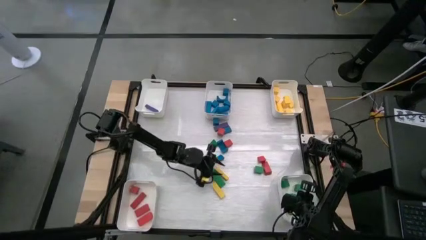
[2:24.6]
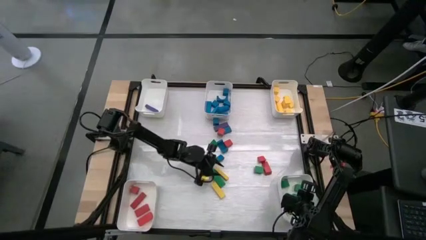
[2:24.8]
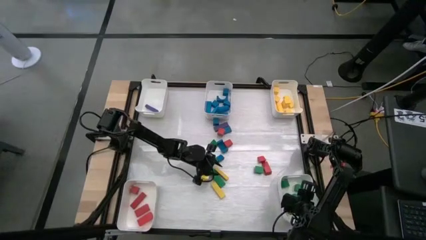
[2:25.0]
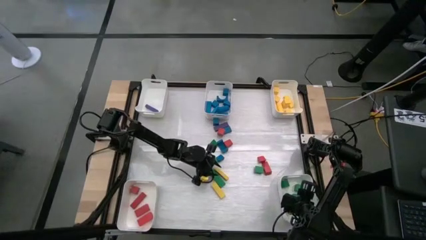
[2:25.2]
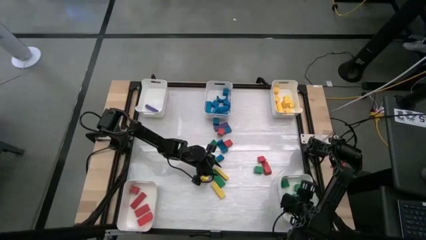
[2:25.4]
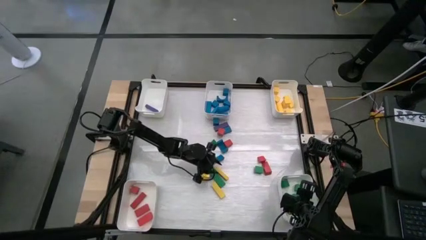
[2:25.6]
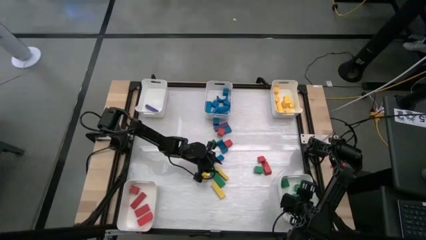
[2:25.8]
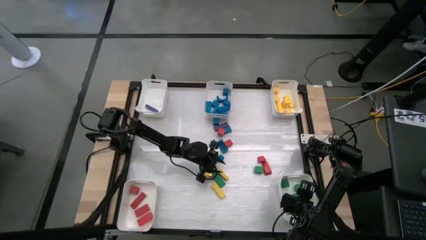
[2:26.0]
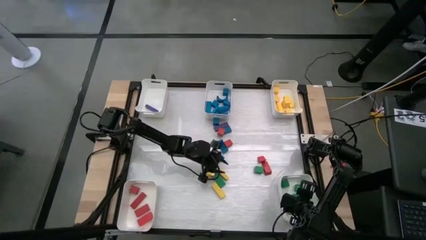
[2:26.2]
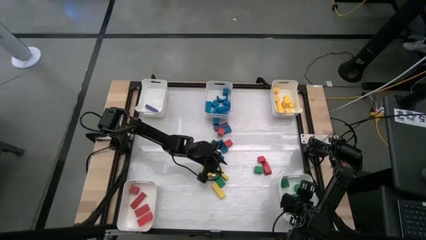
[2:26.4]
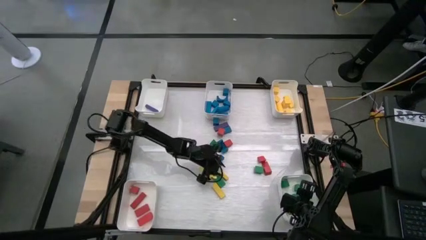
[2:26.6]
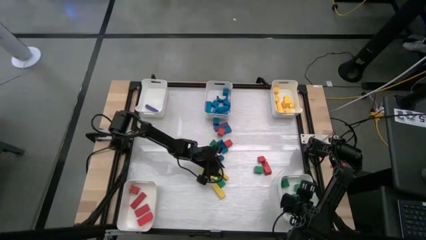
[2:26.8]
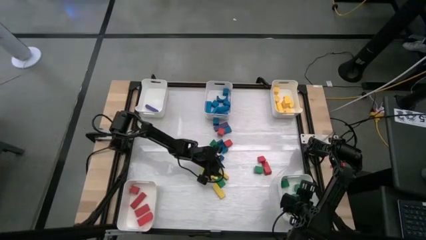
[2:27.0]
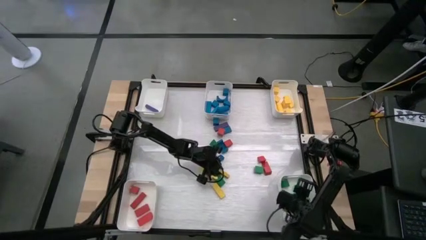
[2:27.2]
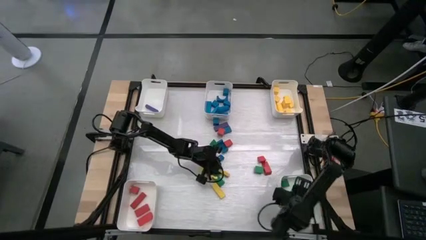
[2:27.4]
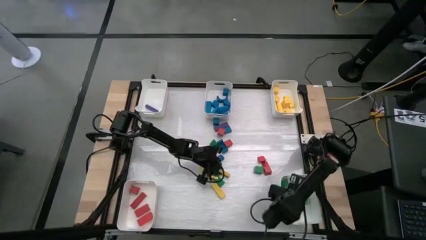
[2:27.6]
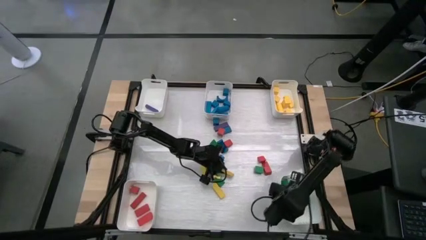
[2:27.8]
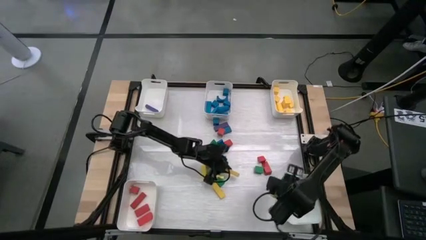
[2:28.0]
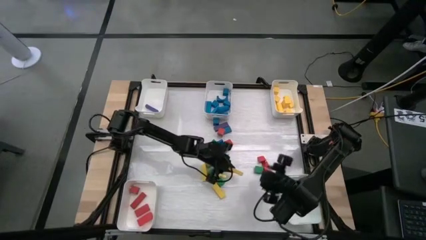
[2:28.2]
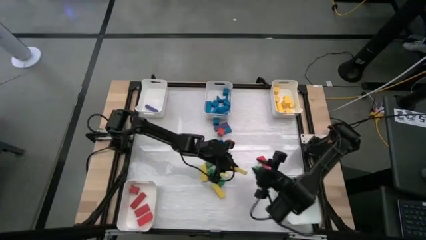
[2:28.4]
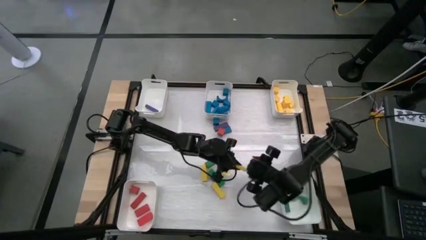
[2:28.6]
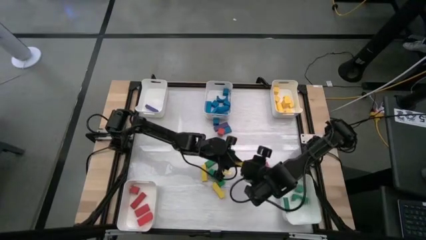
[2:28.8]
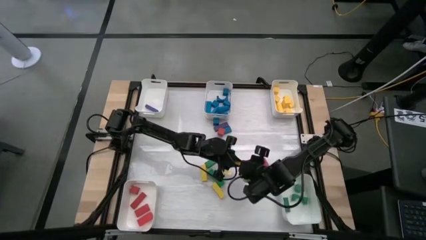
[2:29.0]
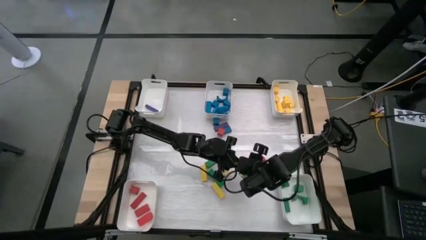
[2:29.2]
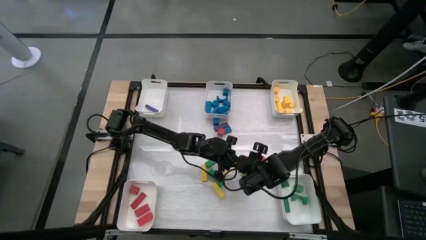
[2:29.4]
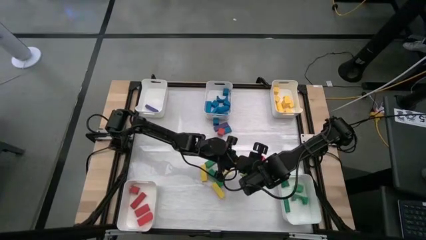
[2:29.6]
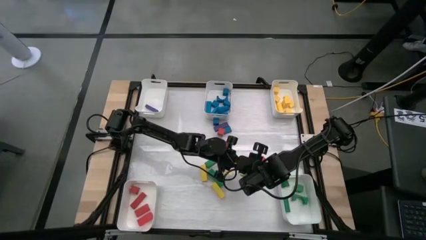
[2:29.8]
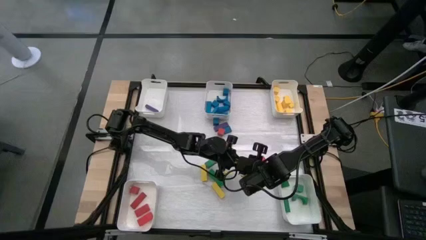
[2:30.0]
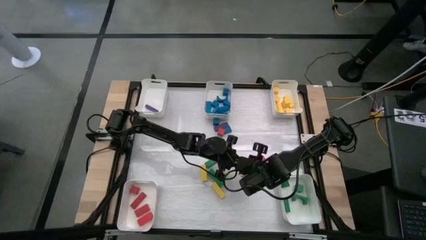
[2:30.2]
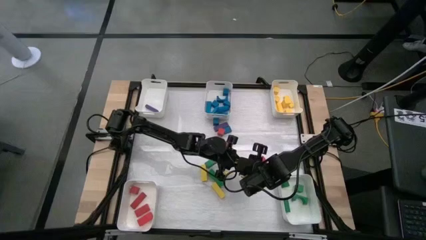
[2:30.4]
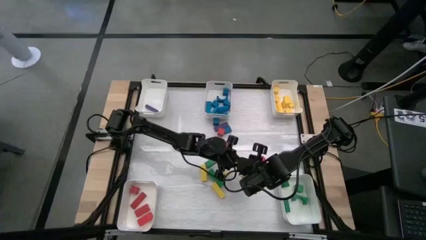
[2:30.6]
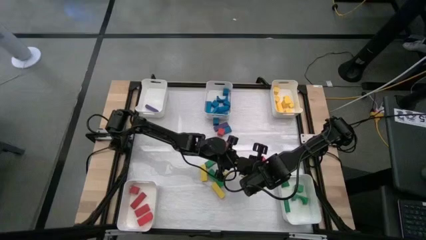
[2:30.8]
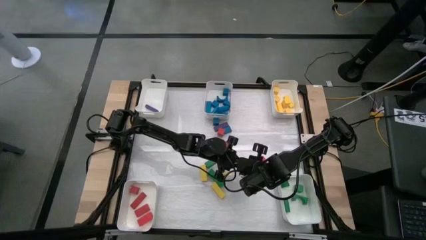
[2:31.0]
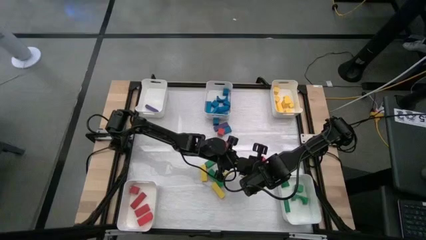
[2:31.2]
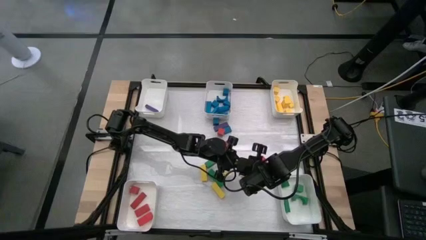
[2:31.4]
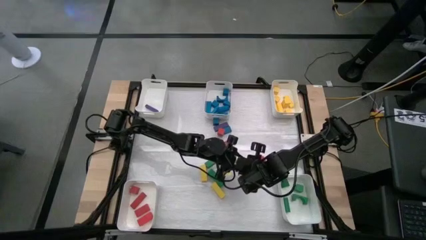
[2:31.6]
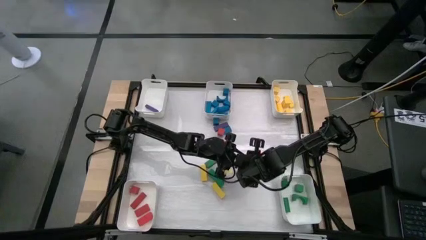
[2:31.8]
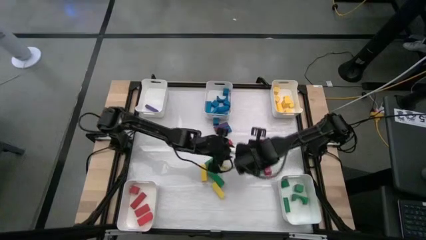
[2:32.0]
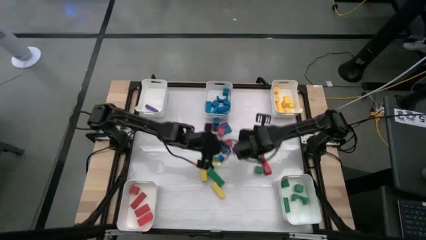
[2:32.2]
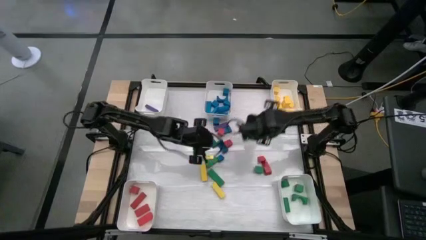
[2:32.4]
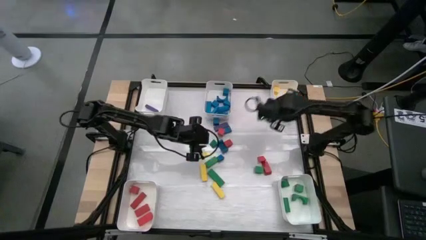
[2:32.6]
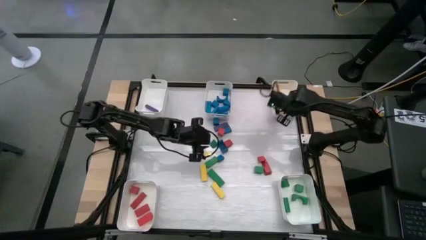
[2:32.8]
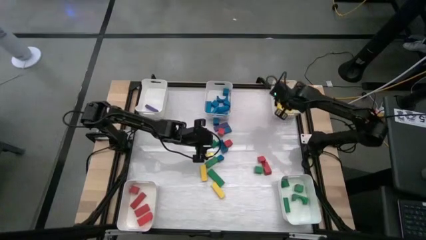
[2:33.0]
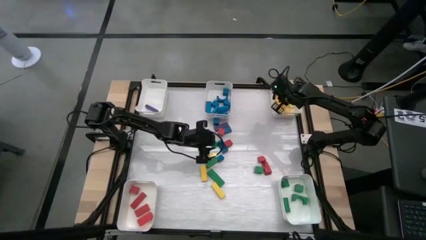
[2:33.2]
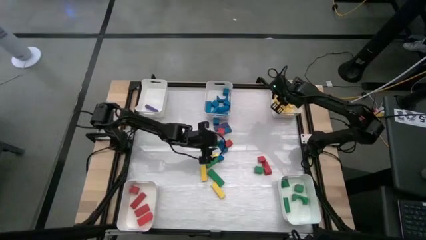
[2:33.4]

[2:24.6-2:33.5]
Task: Sort blocks
Put the yellow block into the top right white bin

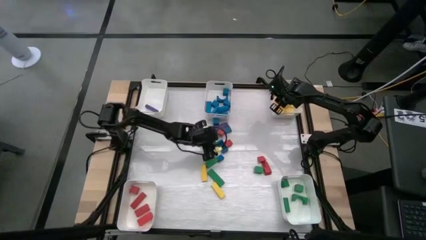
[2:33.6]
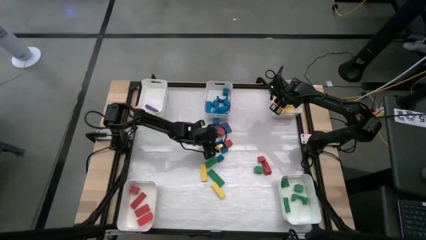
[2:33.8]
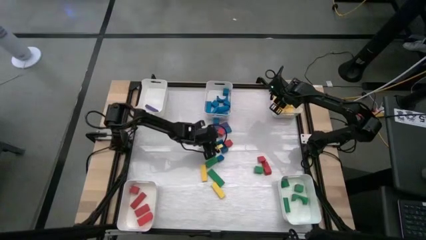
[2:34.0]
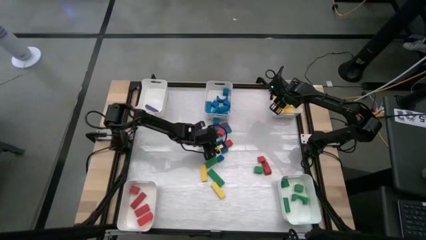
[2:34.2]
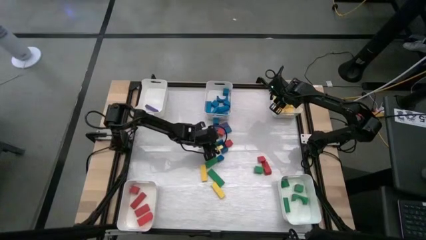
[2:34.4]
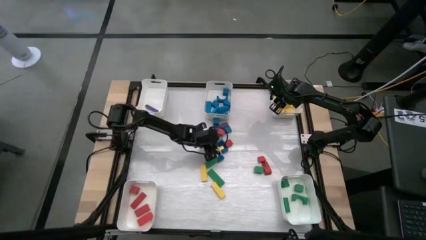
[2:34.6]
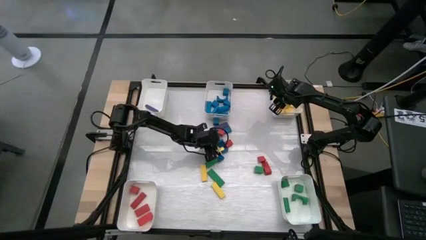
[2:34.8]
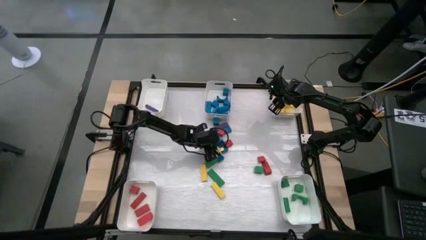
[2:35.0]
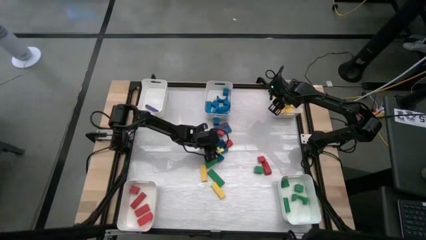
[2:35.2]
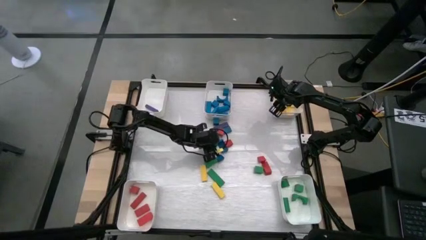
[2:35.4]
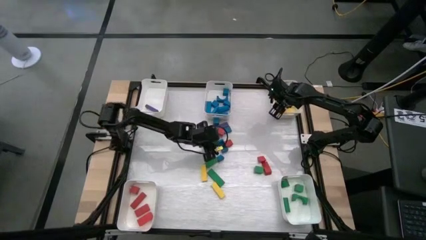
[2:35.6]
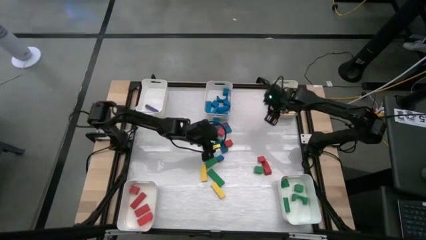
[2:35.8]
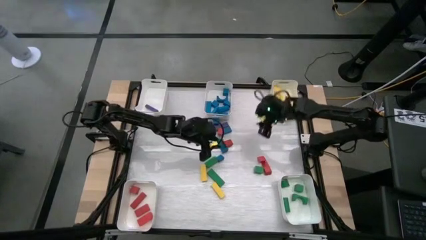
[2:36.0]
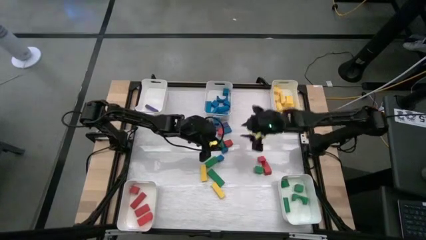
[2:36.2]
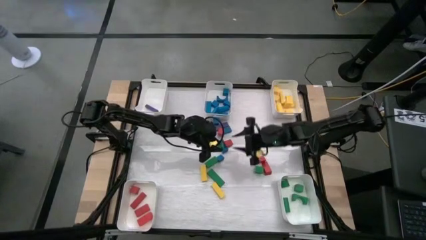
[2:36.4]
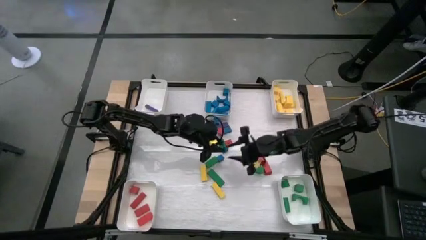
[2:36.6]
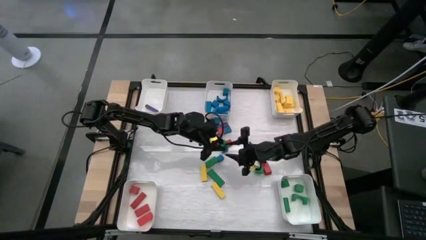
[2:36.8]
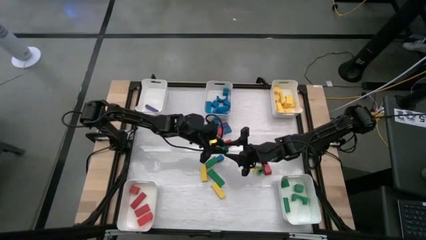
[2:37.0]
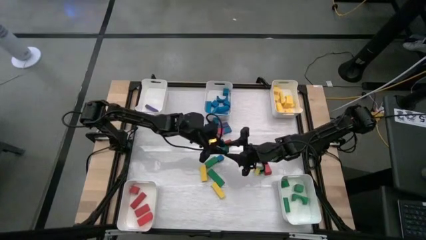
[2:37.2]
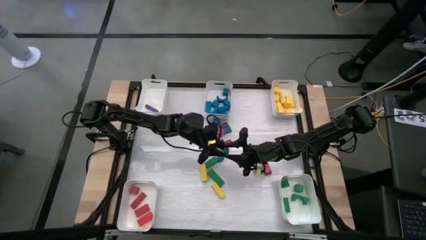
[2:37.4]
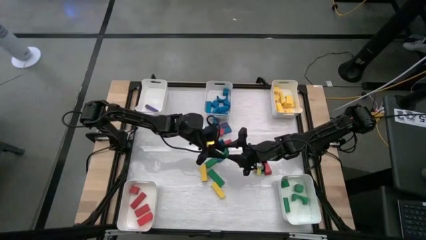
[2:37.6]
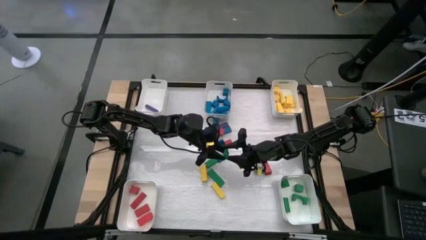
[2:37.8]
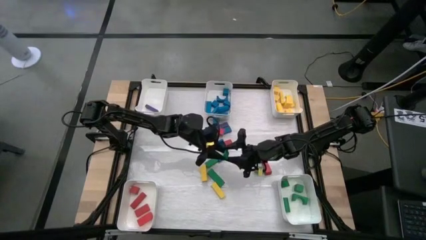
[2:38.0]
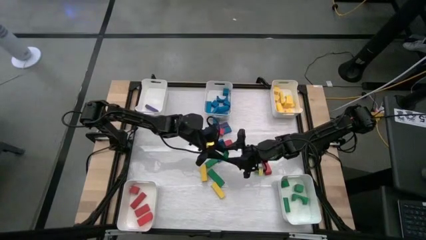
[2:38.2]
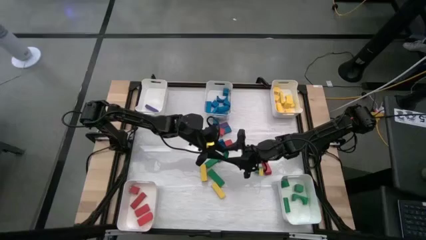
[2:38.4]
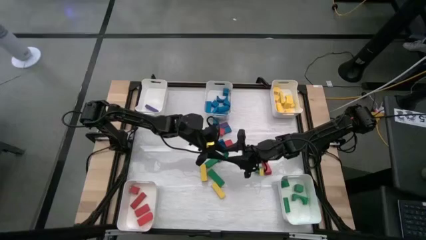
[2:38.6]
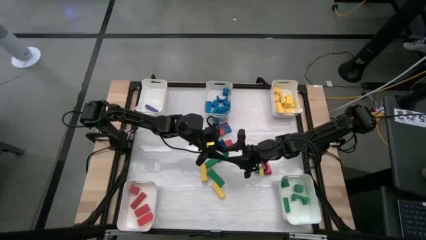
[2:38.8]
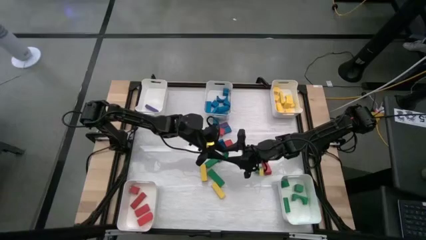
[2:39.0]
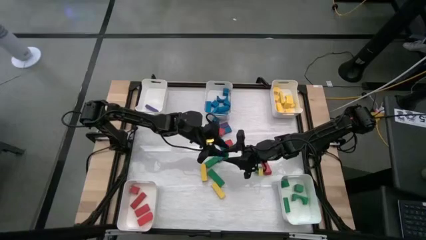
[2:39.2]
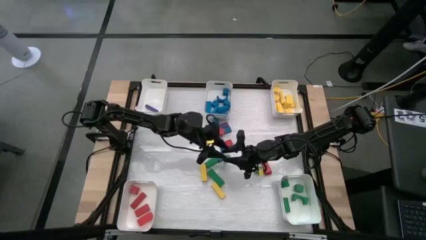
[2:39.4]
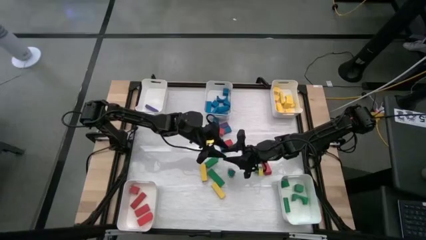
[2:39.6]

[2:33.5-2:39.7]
Put the green block into the bottom right white bin

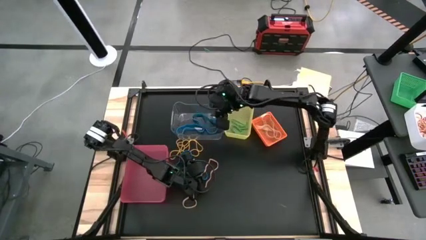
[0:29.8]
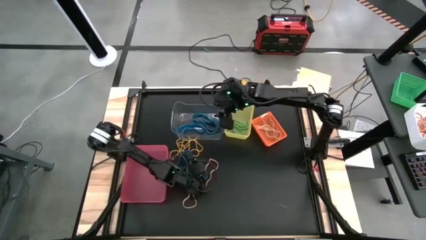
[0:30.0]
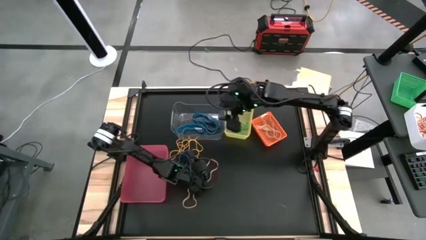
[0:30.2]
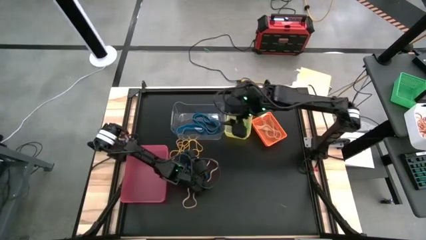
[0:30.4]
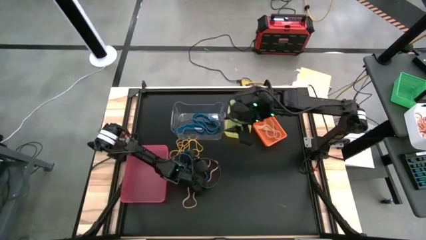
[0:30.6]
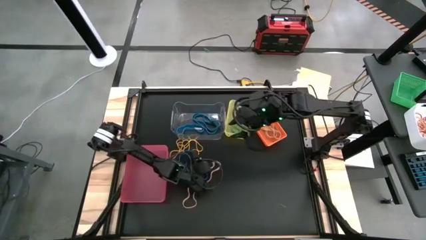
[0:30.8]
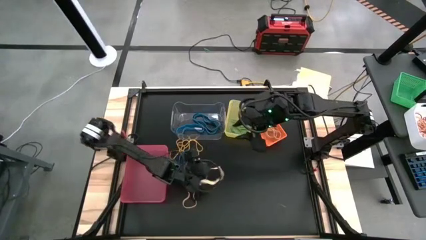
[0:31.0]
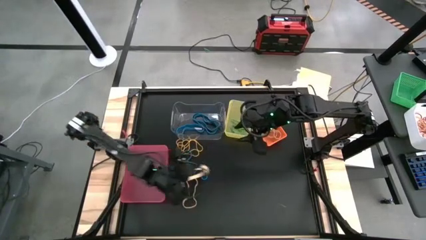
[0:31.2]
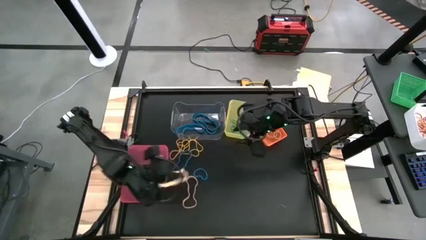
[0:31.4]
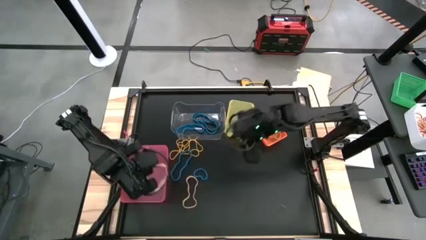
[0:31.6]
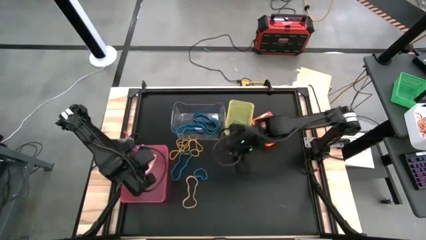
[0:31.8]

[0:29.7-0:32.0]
Task: Sort rubber bands into baskets
Put the orange rubber band into the pink bin
